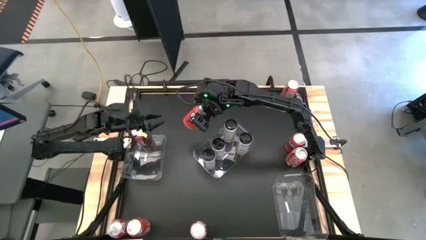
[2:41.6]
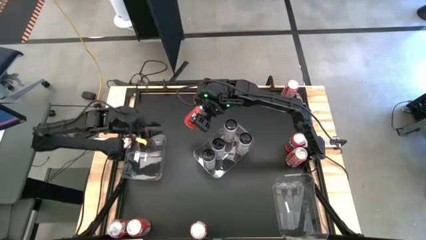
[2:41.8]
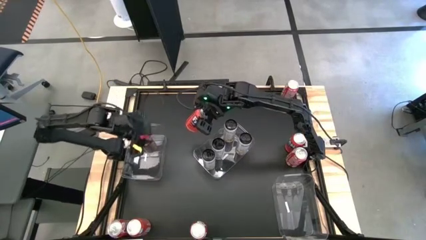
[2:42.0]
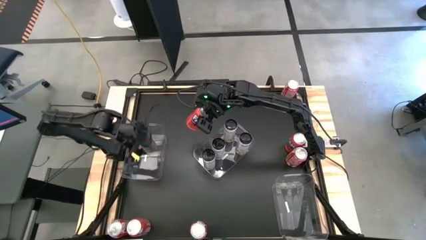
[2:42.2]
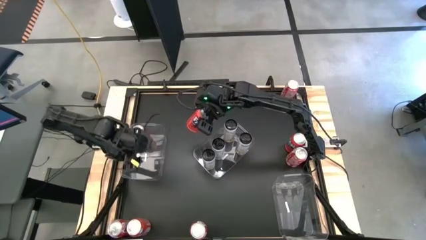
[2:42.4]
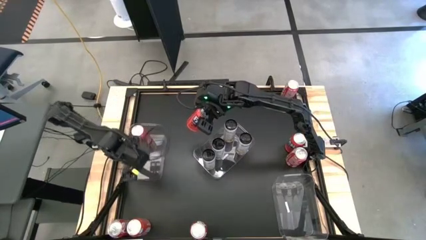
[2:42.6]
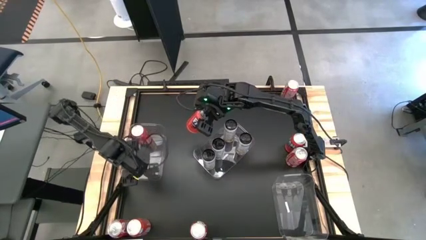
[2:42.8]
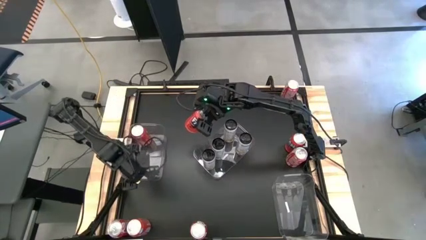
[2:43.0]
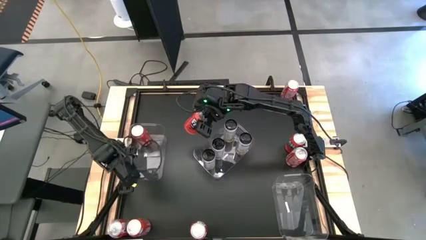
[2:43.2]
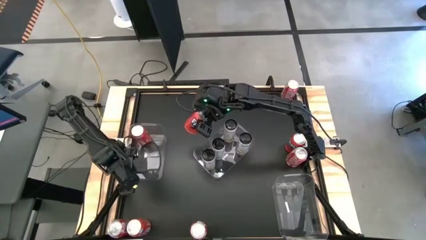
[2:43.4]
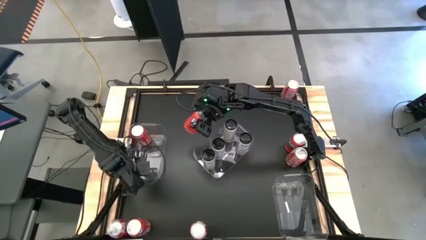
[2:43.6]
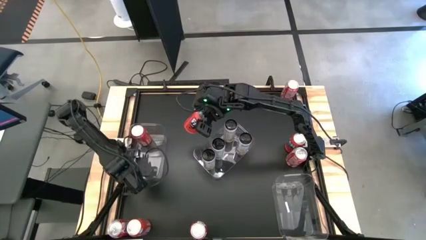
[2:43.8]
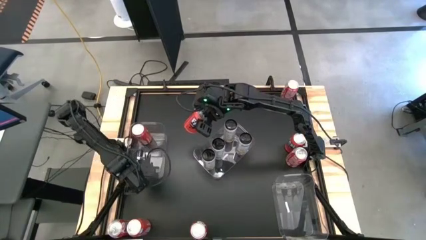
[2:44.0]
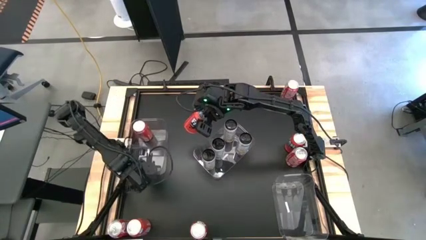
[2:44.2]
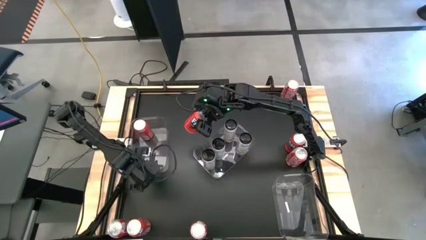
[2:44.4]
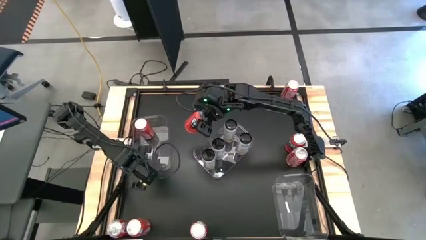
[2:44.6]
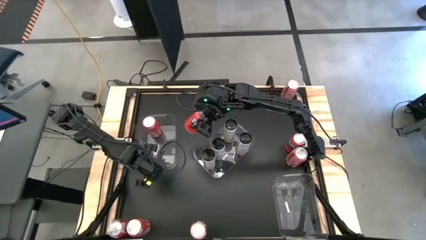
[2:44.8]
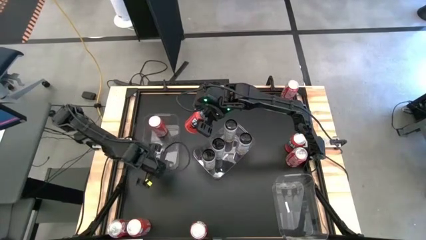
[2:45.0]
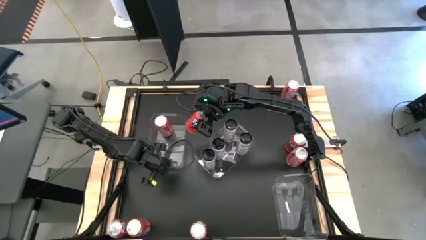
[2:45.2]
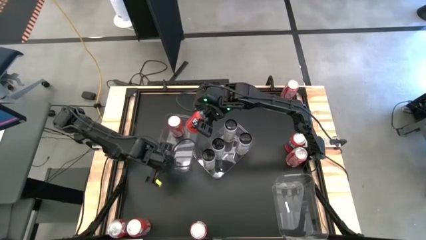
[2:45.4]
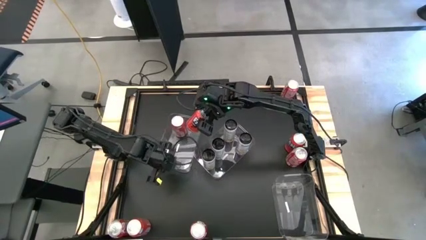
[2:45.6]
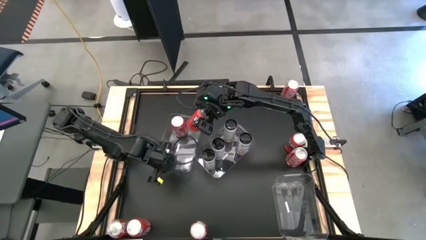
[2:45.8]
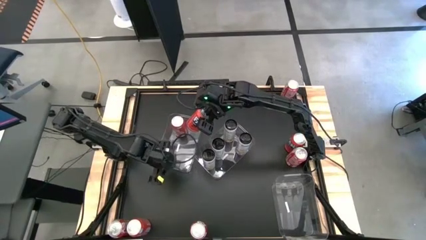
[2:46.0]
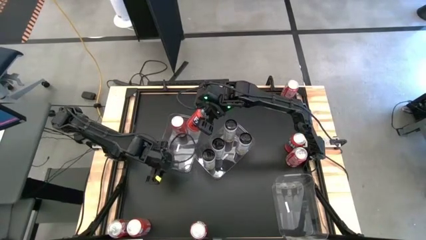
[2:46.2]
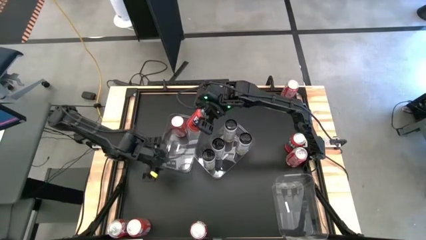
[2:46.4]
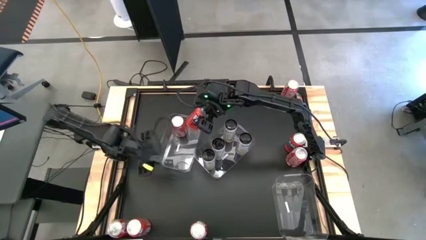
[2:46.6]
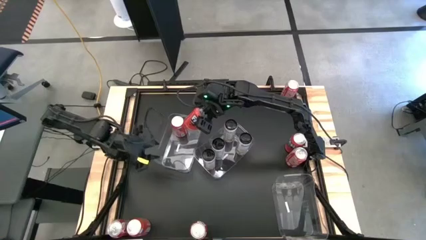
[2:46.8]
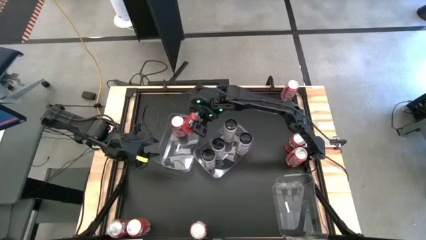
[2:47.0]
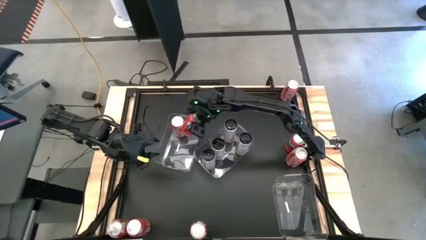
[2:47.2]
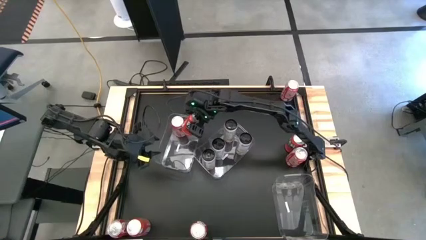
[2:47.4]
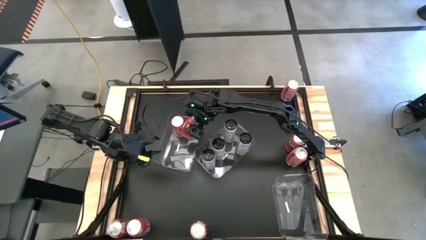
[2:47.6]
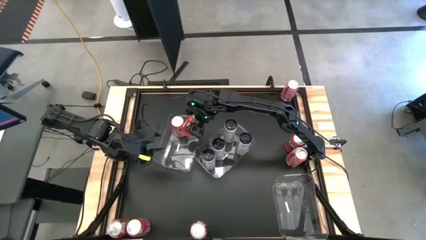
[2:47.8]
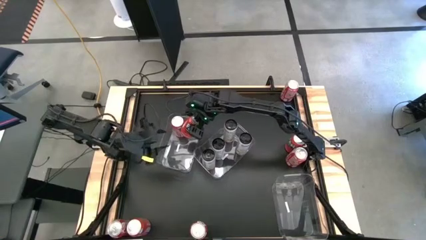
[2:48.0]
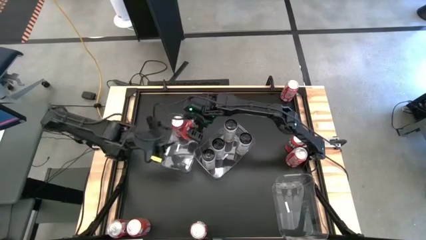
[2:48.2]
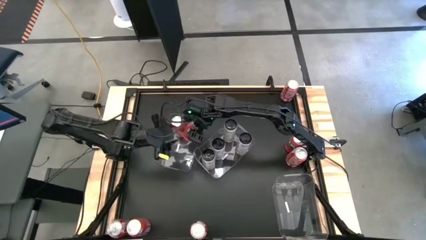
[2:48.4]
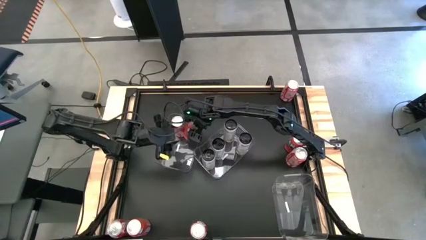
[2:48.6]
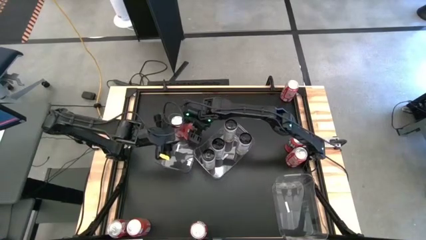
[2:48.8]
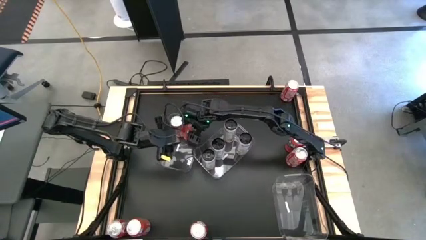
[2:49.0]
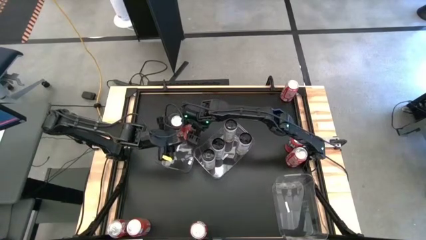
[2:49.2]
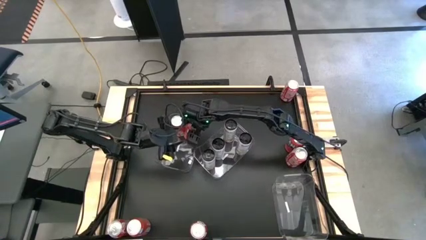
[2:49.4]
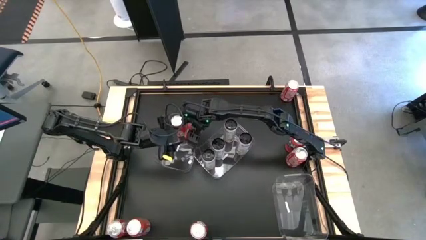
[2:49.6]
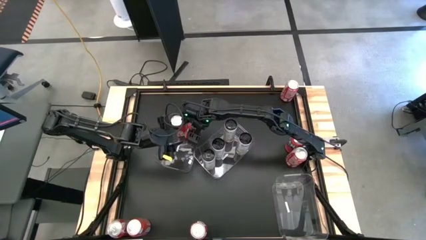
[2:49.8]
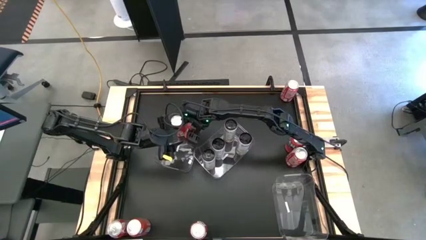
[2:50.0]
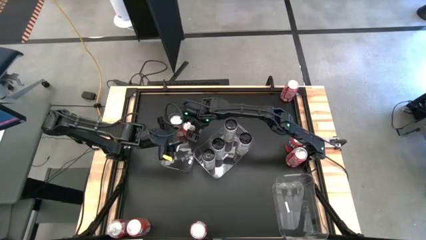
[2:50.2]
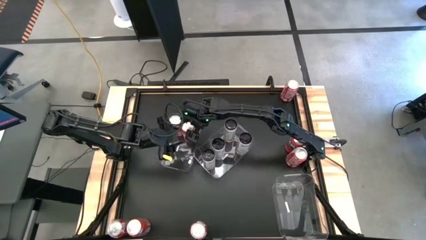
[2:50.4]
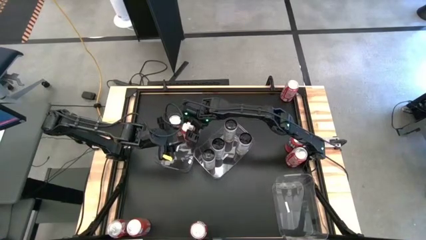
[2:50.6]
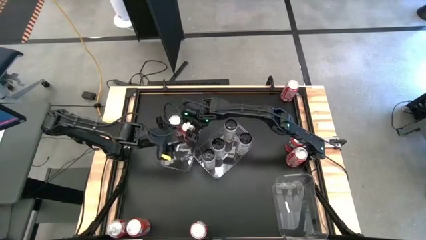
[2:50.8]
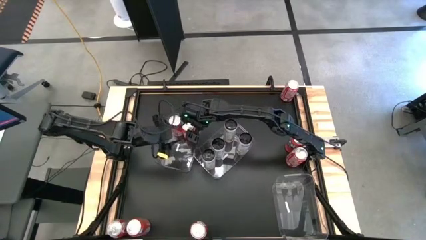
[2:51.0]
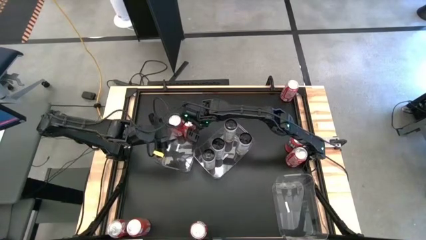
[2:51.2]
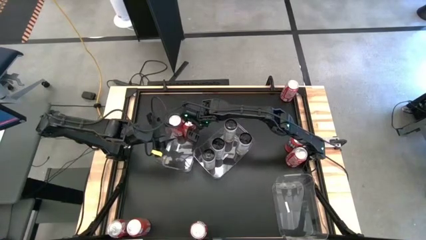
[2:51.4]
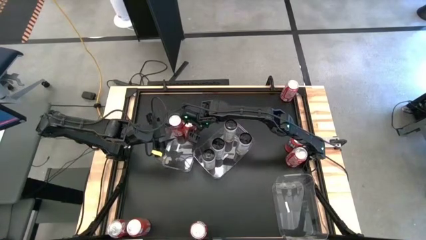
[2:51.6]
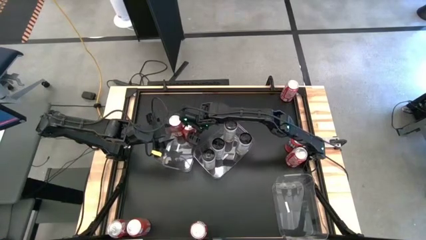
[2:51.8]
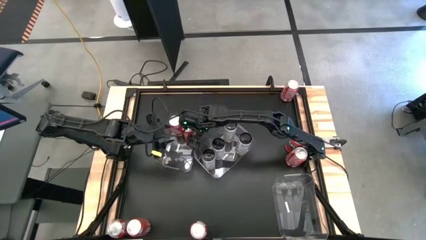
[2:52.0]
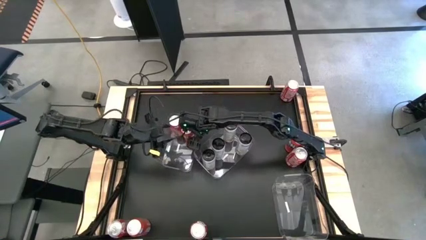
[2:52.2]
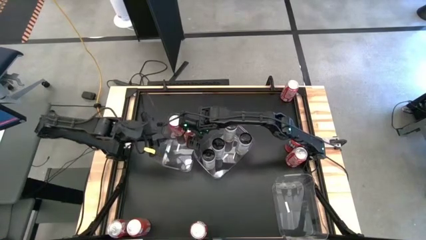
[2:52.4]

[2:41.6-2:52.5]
Task: Sort soda cans
Put the orange soda can into the left transparent bin

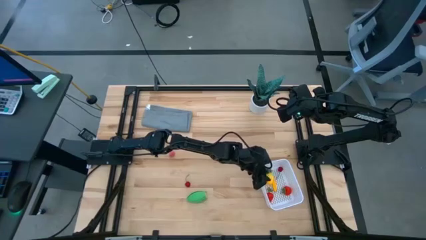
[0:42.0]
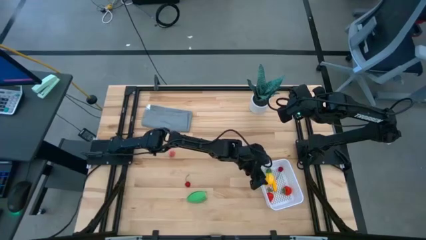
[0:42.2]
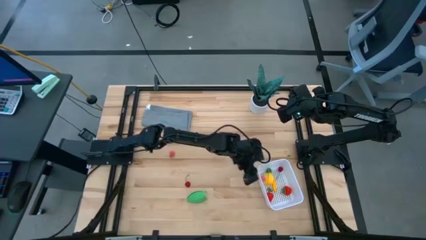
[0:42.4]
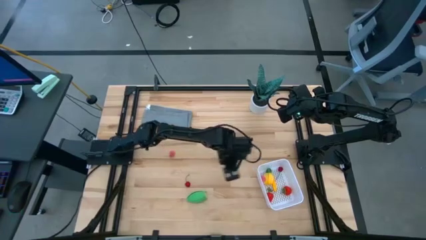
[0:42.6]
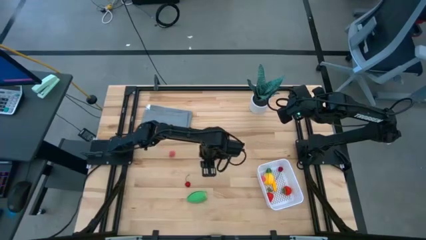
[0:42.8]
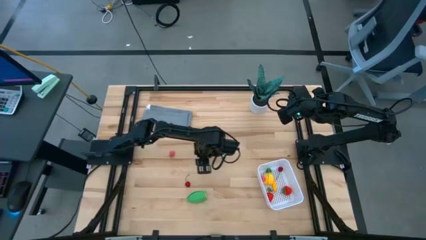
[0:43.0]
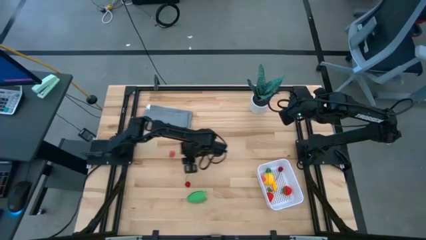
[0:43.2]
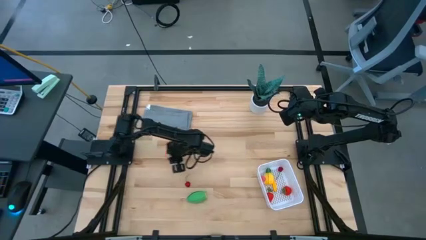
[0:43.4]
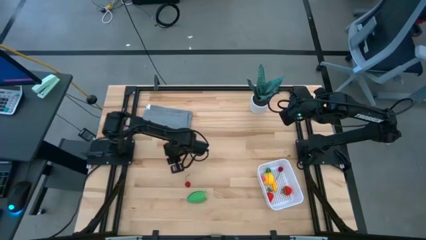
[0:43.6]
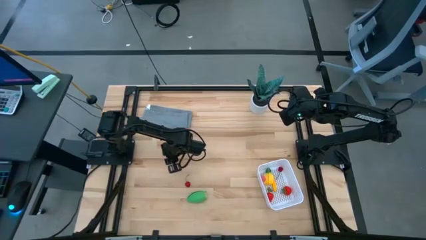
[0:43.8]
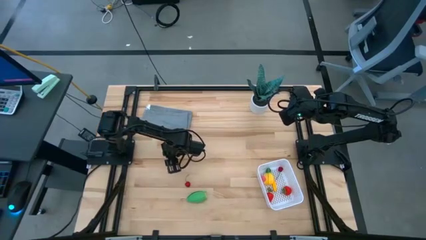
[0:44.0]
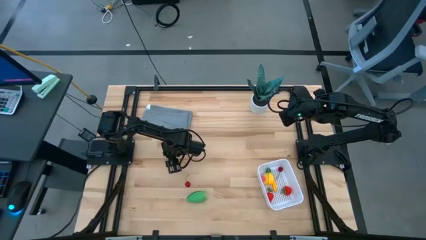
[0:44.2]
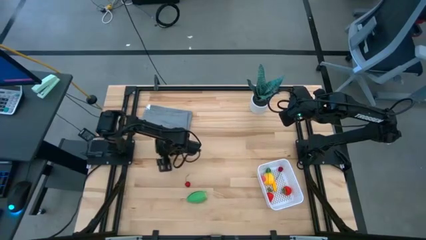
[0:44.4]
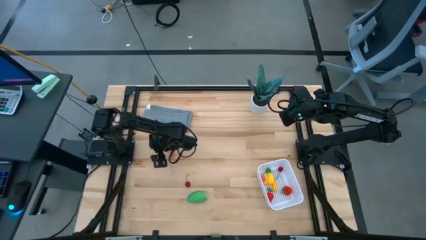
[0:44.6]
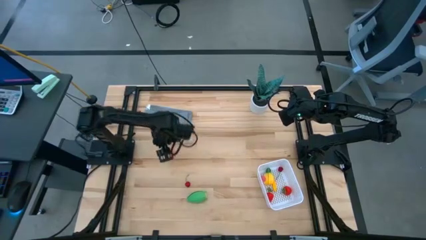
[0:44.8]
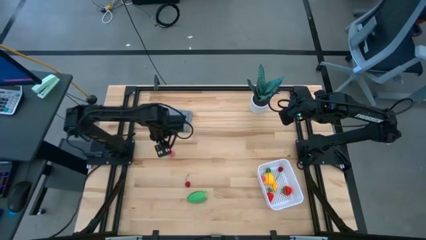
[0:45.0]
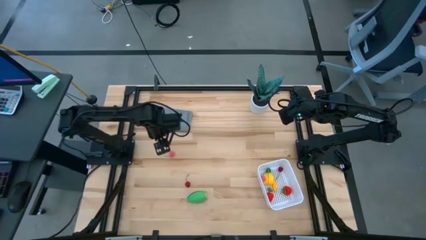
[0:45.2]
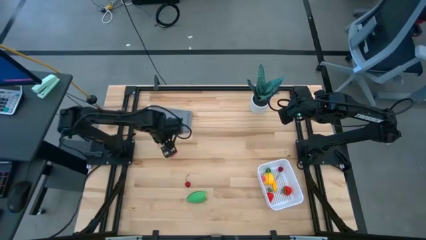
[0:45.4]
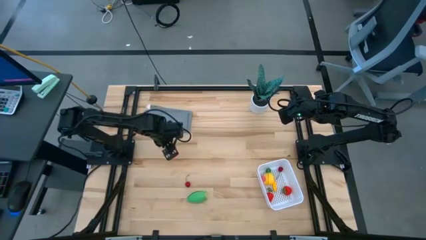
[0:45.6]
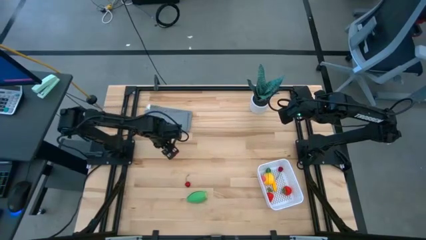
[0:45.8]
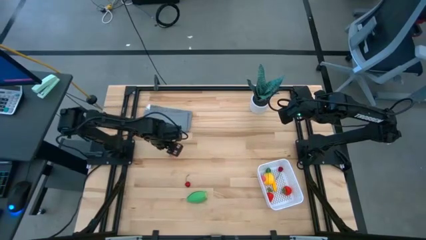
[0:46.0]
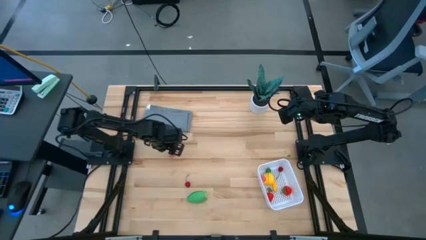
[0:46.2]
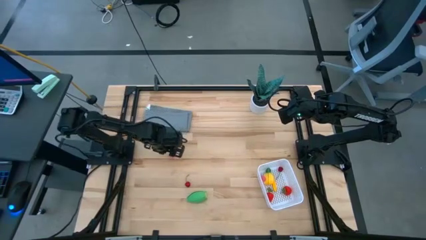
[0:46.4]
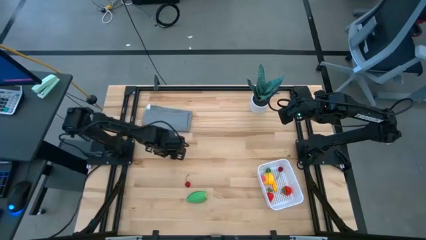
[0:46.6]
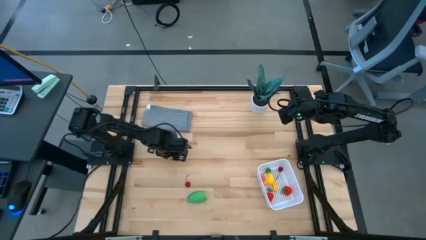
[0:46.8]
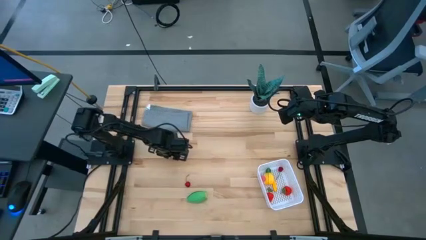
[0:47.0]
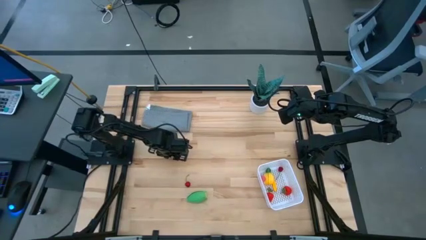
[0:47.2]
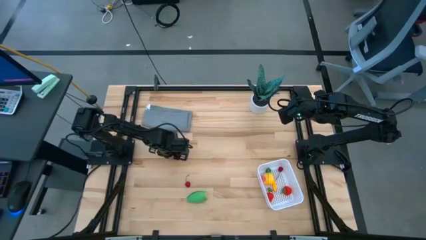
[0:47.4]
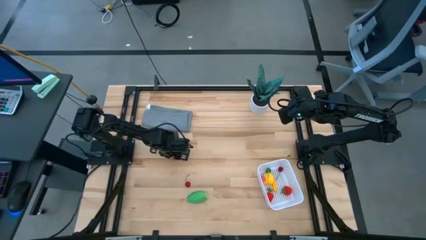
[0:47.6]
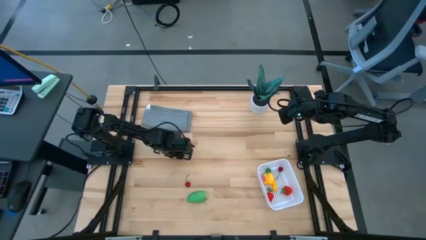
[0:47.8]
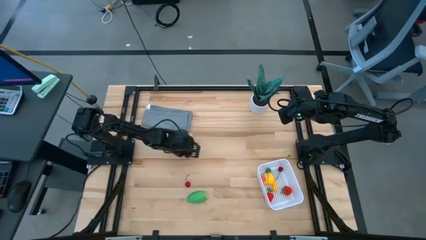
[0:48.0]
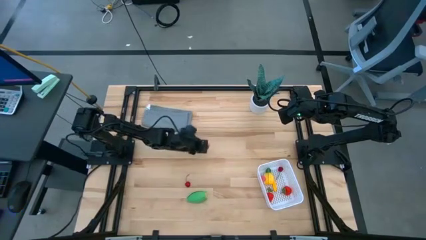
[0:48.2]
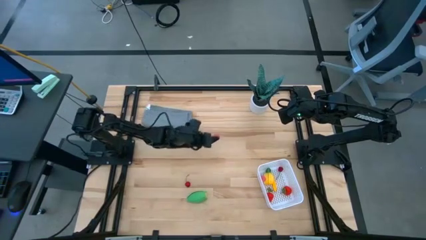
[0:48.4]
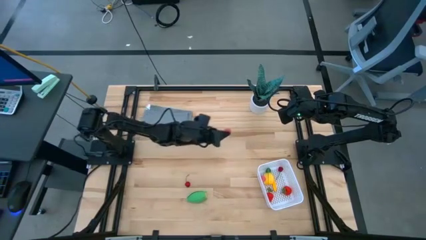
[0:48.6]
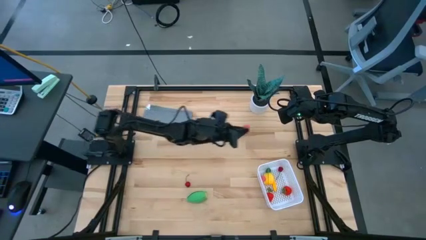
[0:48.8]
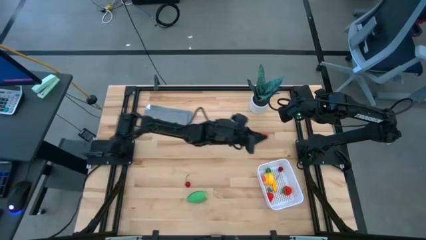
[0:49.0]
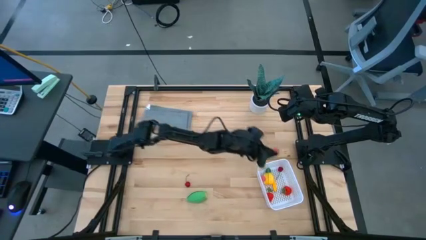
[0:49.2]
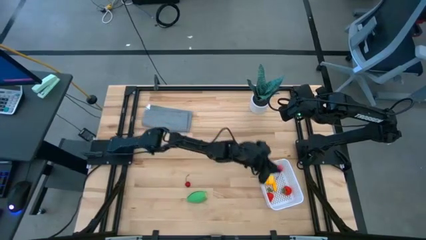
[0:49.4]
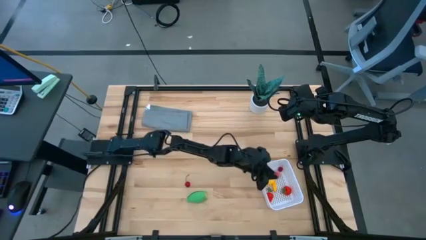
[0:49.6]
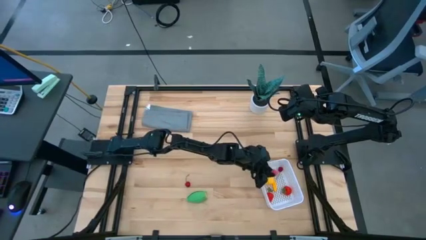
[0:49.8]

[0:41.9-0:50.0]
Task: Pick and placing Produce into tupperware
Put the peach into the white bin
